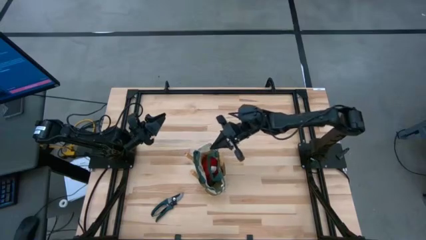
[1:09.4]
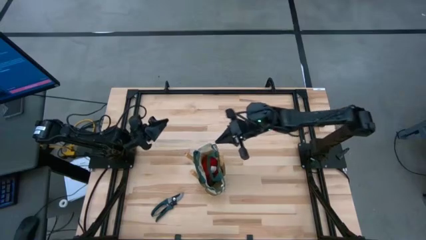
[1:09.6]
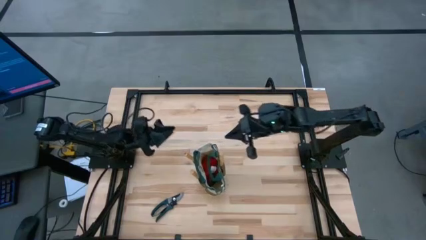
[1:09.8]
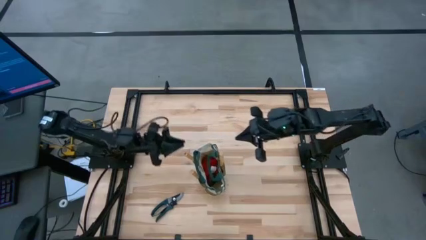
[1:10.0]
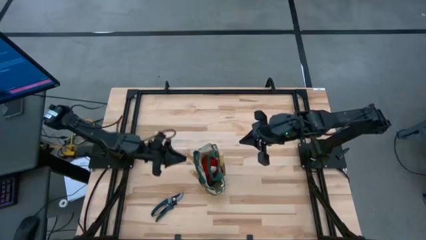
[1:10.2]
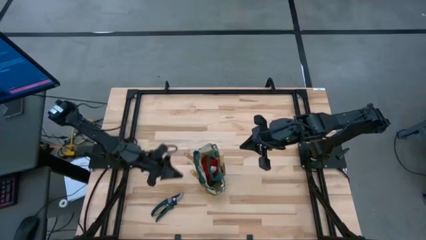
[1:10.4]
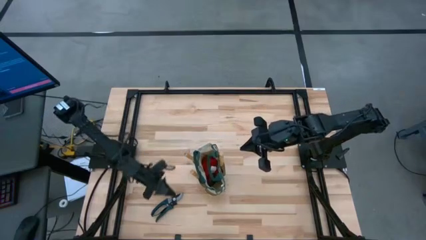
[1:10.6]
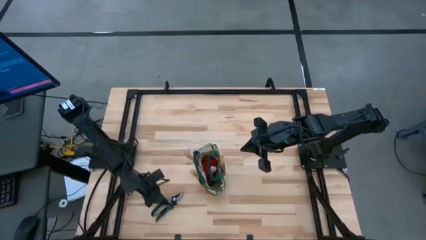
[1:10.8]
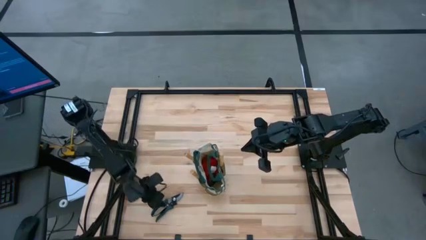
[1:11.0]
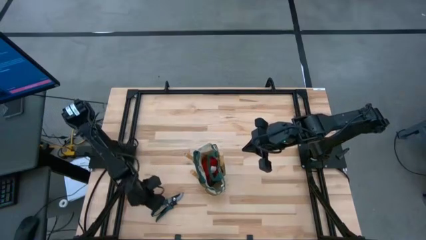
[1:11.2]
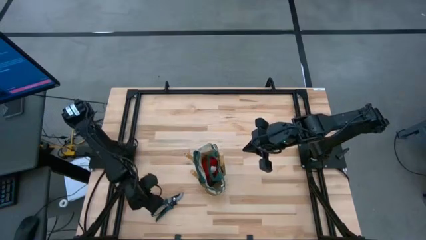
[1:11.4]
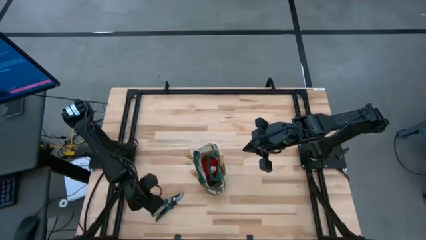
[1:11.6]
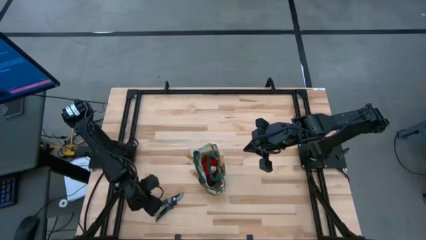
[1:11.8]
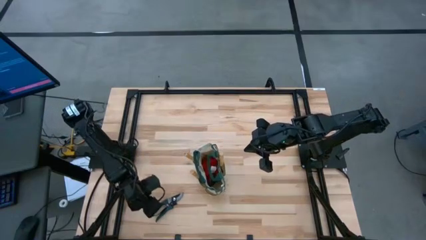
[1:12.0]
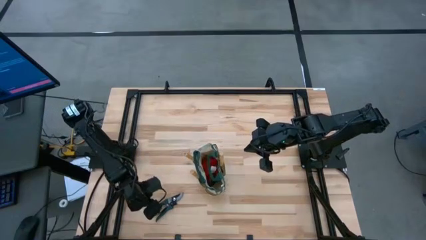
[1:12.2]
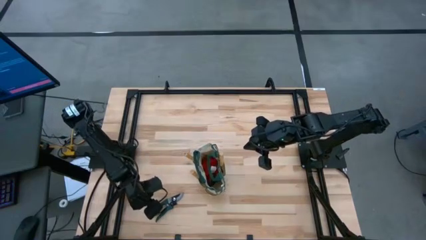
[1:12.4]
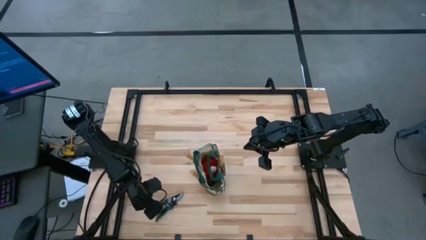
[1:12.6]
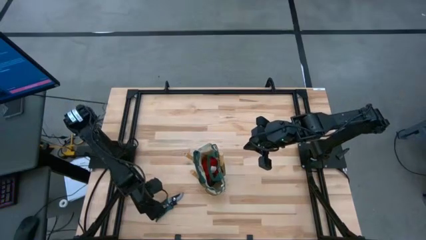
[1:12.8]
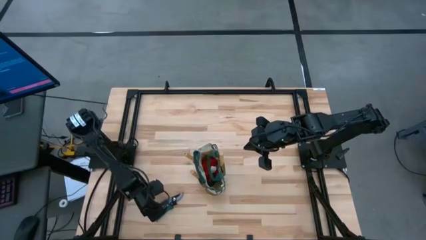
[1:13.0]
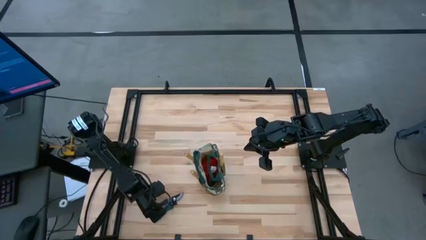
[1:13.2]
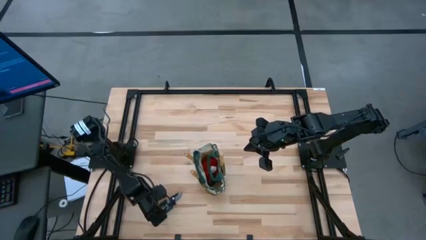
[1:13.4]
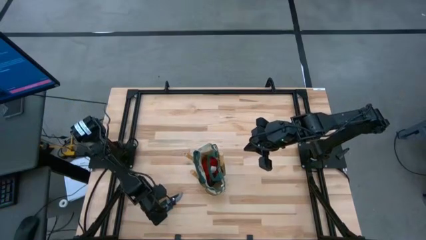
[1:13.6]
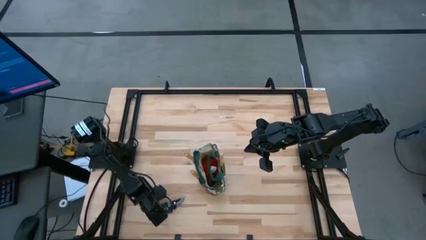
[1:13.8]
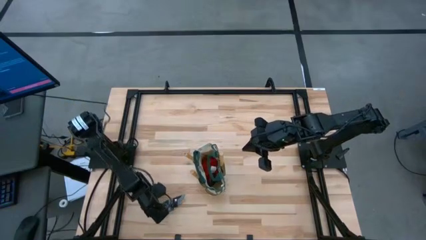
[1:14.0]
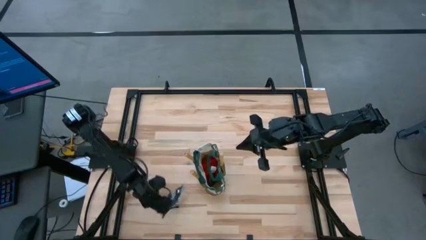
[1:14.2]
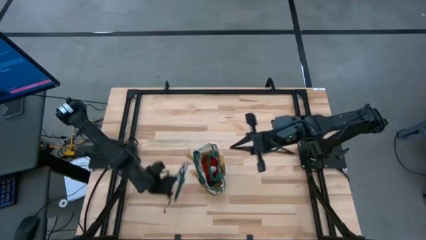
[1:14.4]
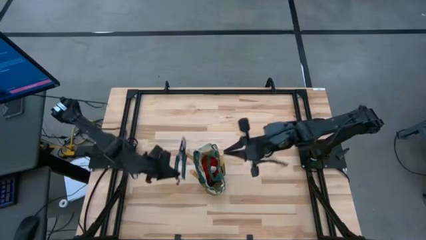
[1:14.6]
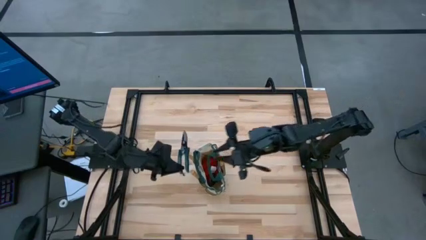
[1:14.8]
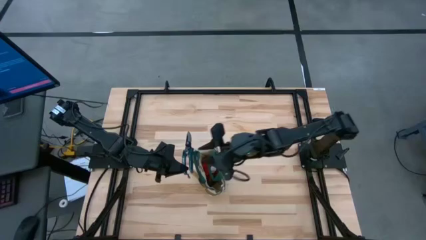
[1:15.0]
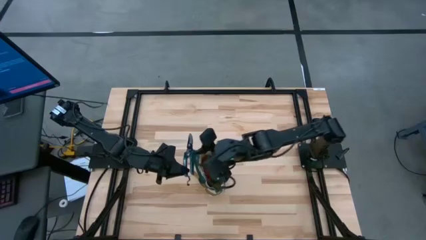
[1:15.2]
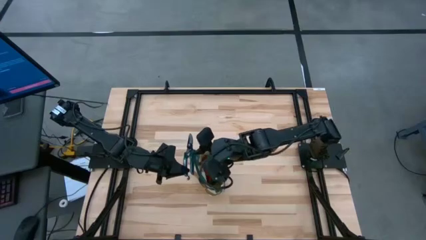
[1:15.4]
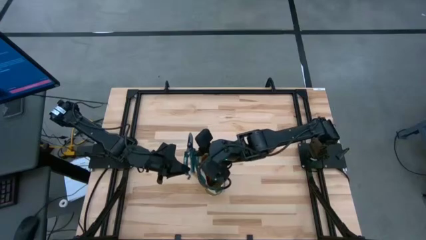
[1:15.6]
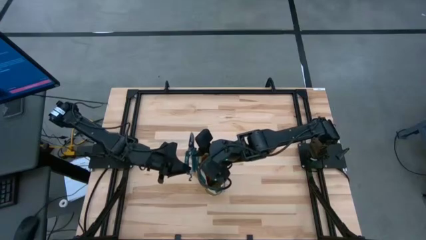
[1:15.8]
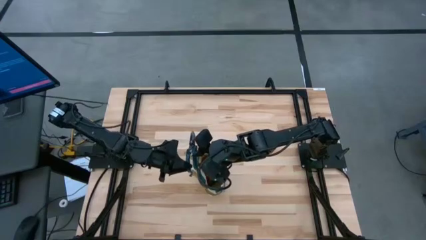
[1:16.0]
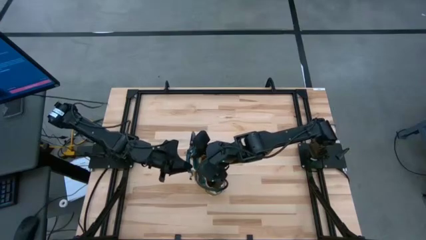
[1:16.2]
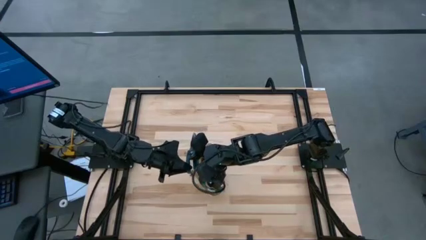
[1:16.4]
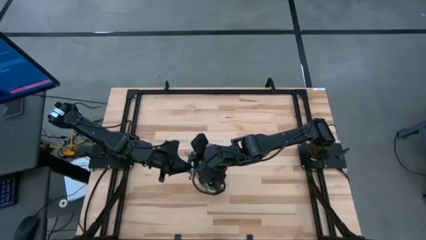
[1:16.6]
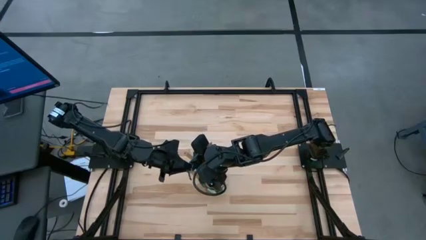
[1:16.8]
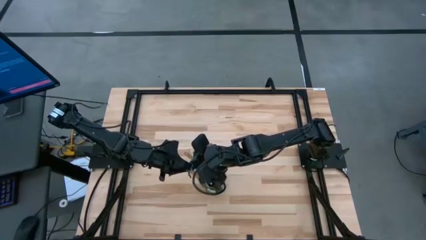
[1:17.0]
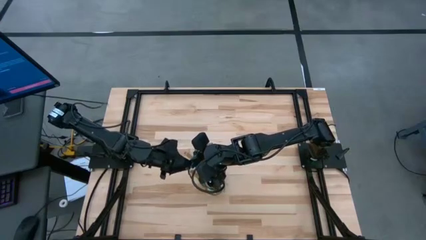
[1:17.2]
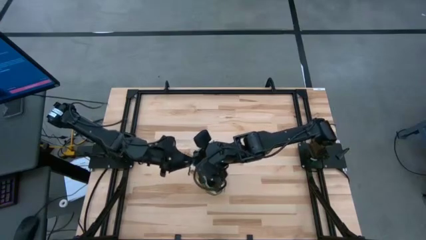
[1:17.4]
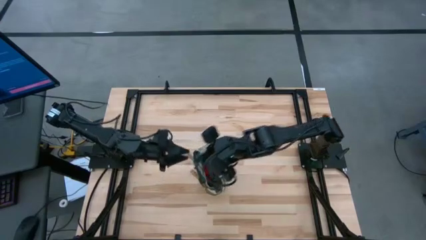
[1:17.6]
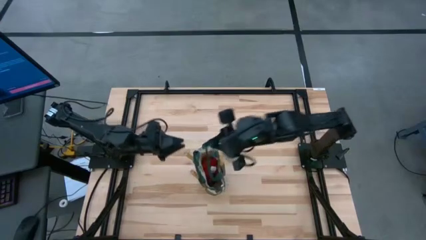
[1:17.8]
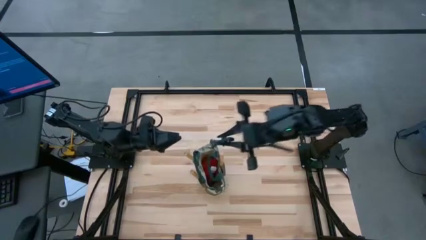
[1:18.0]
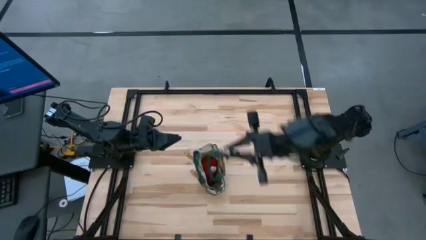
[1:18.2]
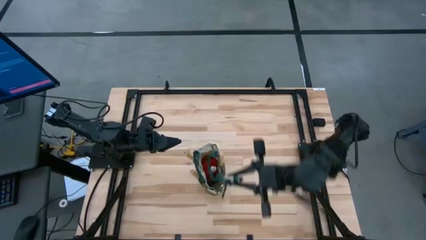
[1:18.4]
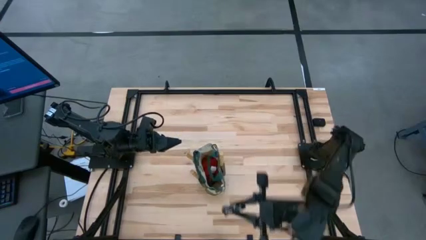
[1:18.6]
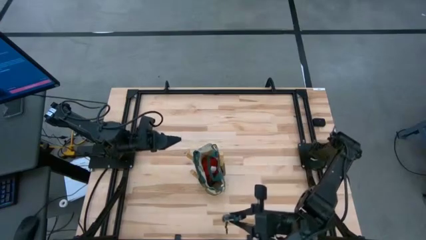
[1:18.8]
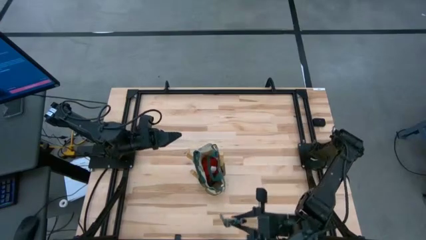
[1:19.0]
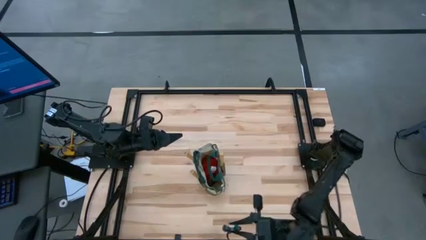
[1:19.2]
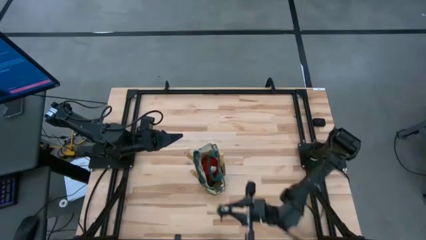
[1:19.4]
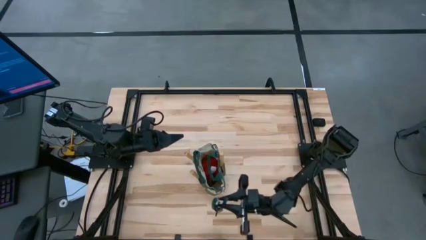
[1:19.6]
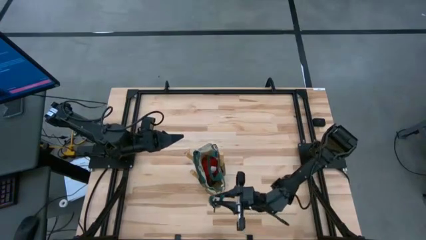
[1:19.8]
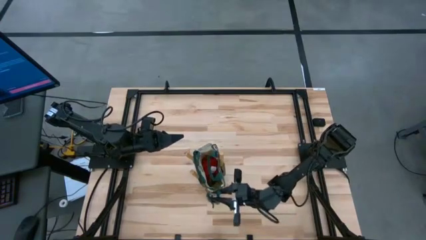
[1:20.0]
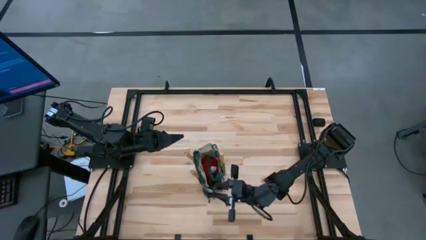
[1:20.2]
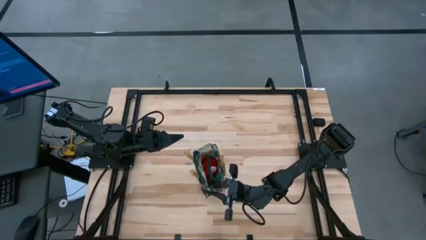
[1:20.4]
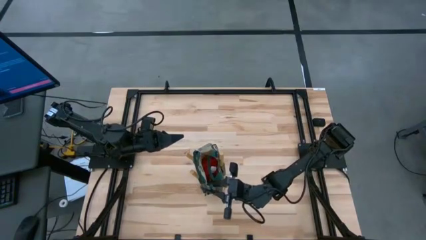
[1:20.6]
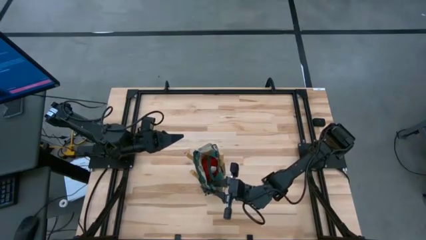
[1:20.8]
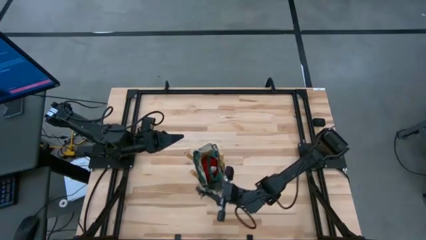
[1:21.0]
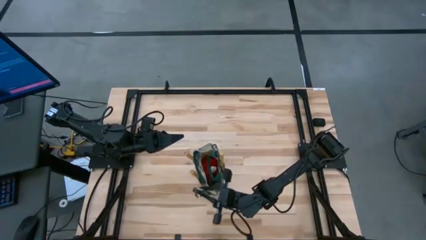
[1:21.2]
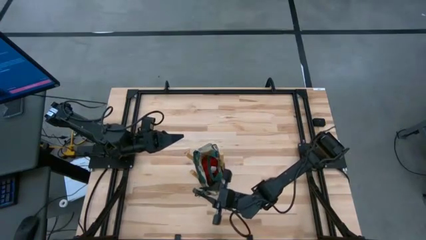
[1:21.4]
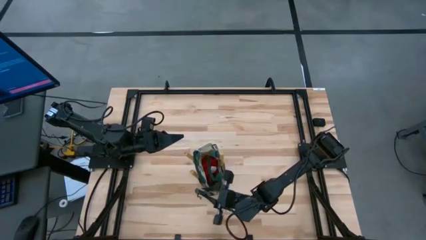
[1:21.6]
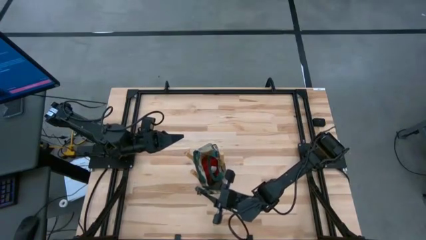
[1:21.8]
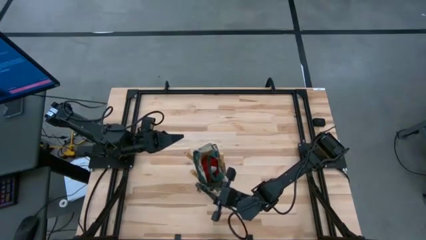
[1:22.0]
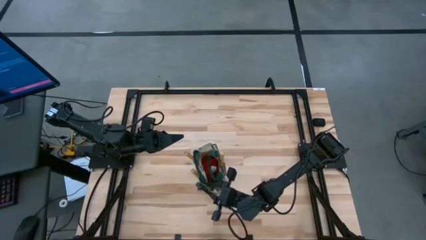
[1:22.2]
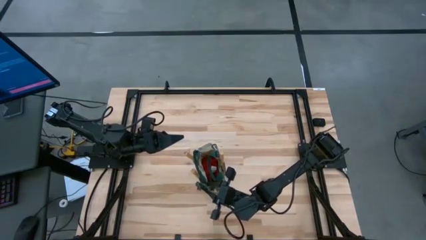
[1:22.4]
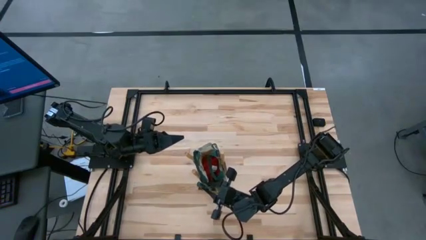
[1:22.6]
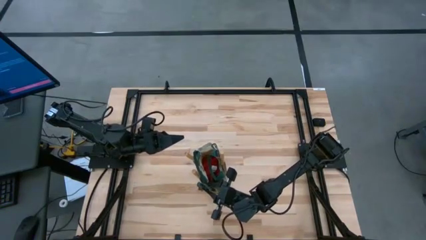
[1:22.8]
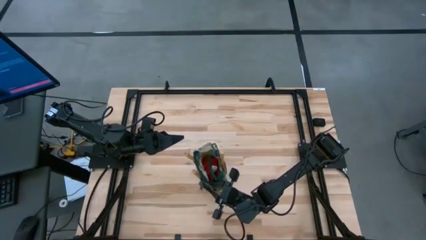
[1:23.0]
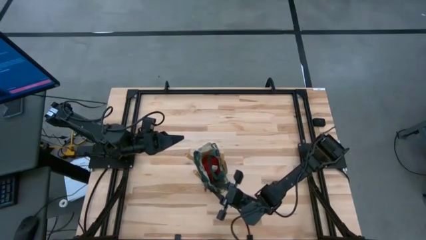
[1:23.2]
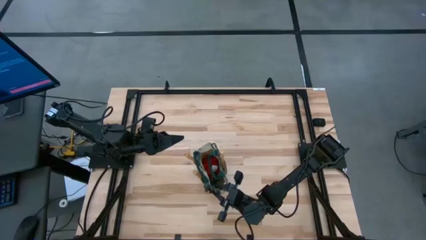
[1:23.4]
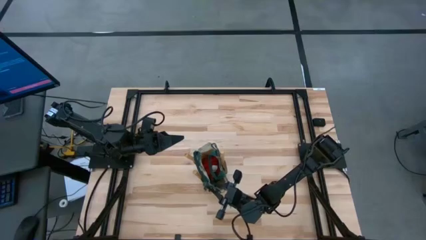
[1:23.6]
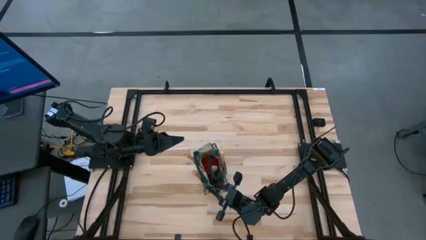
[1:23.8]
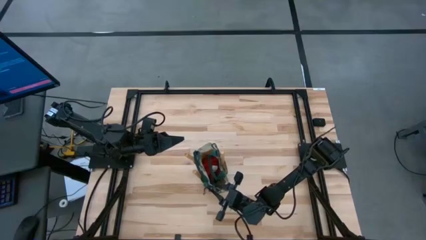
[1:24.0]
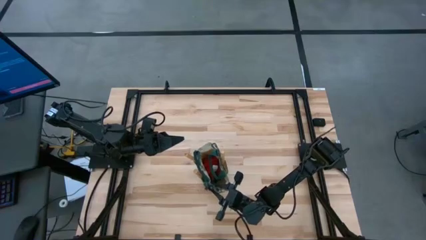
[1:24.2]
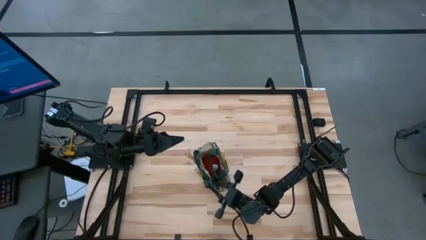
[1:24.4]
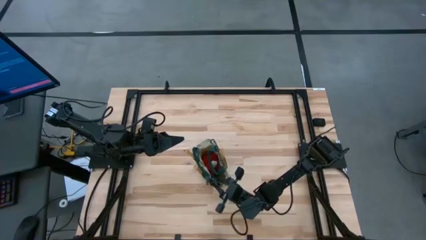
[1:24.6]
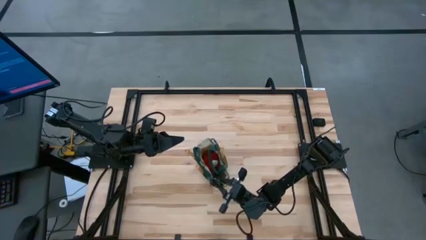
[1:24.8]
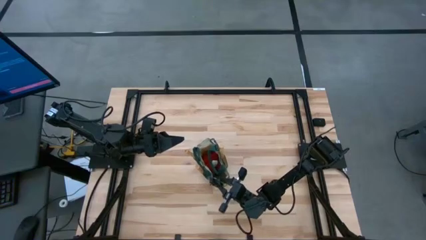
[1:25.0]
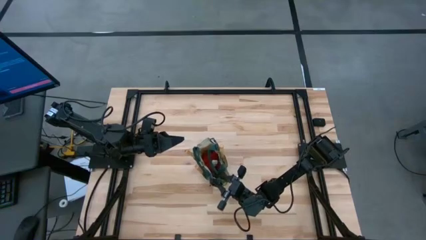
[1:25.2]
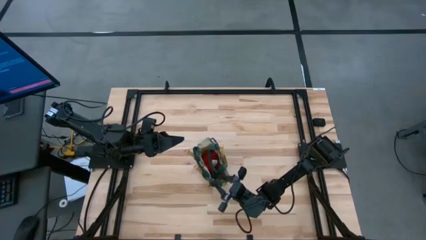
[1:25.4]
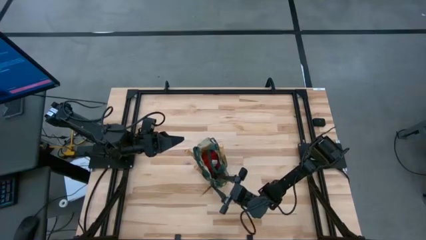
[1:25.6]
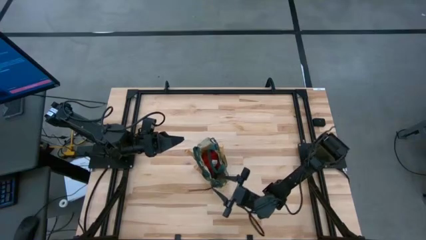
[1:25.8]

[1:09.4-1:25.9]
Task: Pick & Place Garden tools in Gardening bag
Put the shear cutter into the gardening bag
